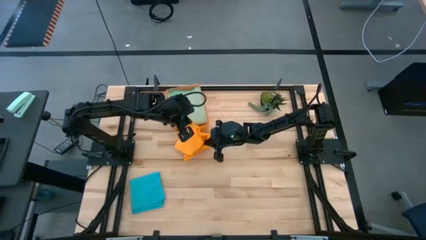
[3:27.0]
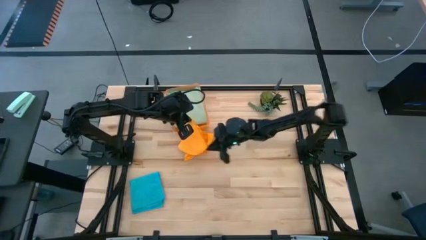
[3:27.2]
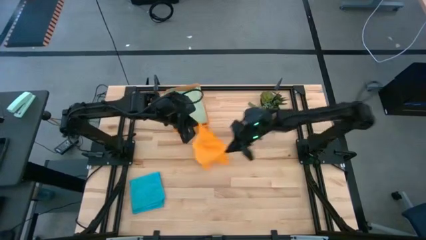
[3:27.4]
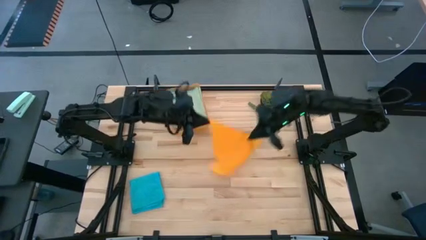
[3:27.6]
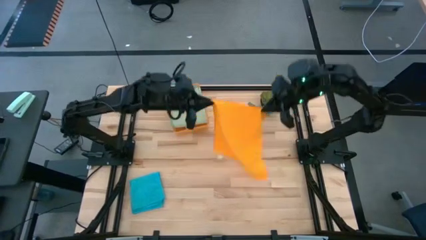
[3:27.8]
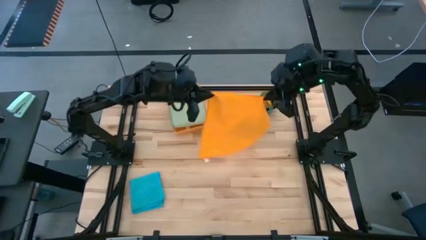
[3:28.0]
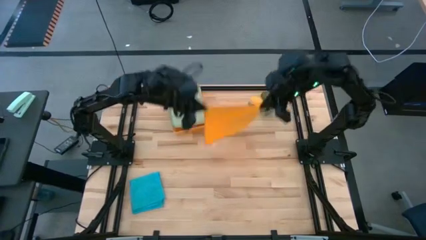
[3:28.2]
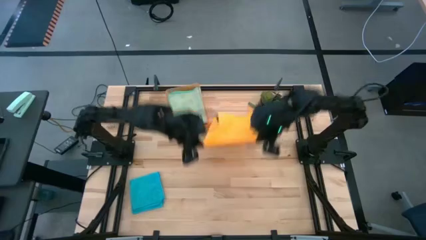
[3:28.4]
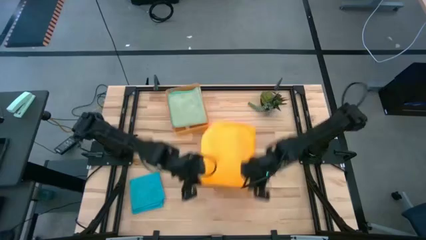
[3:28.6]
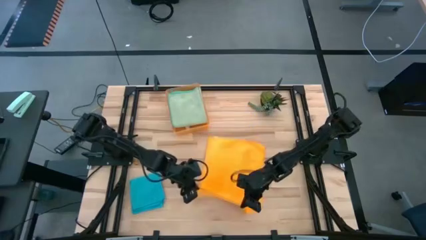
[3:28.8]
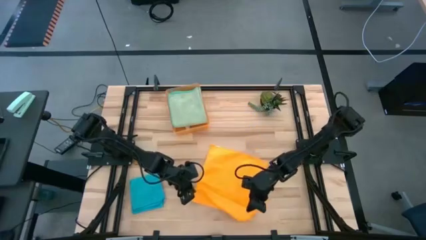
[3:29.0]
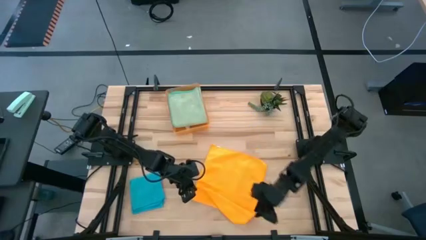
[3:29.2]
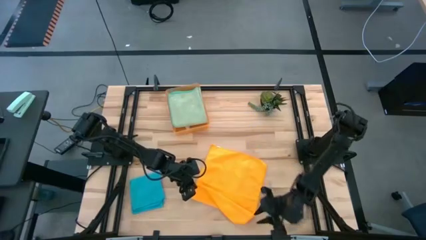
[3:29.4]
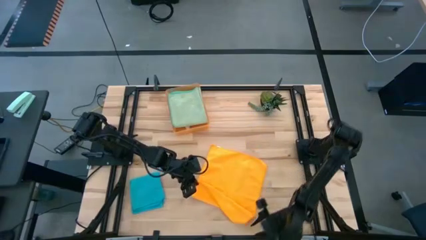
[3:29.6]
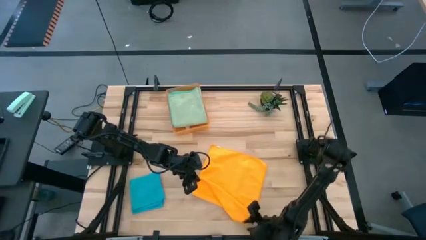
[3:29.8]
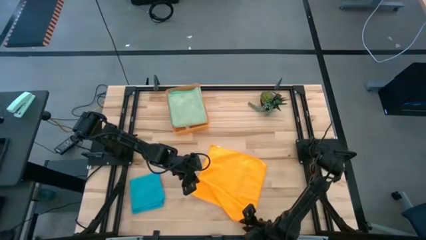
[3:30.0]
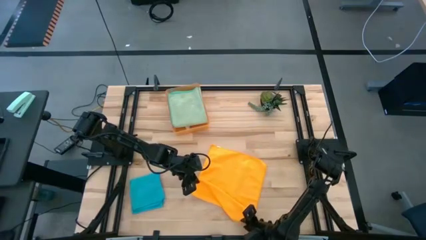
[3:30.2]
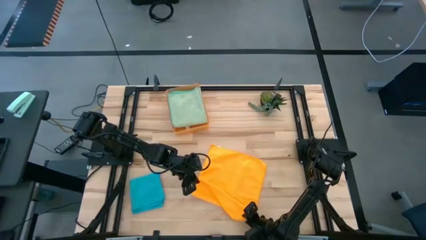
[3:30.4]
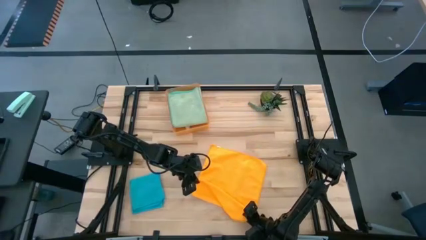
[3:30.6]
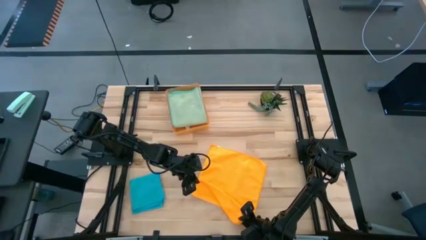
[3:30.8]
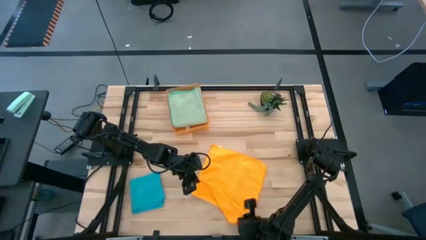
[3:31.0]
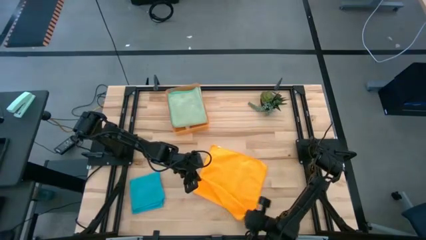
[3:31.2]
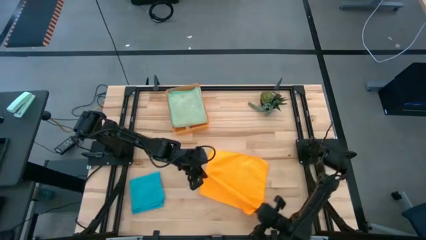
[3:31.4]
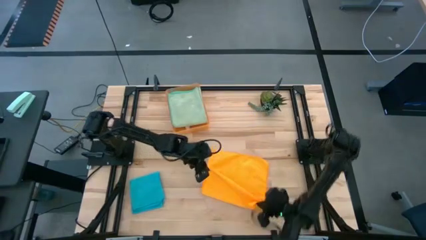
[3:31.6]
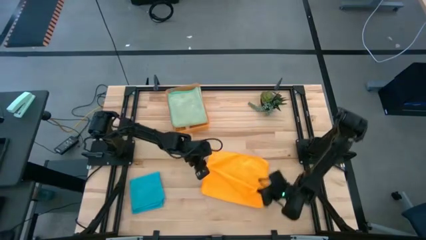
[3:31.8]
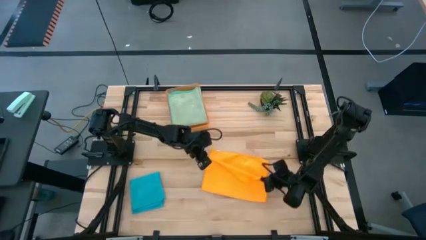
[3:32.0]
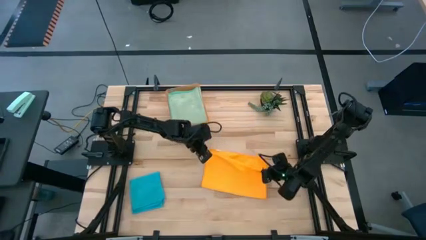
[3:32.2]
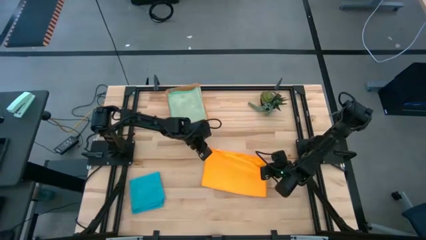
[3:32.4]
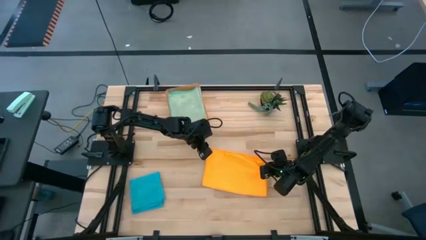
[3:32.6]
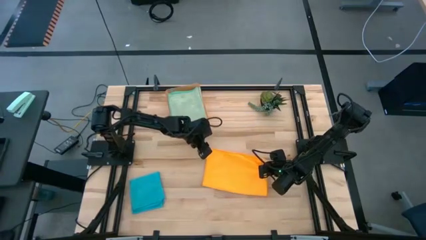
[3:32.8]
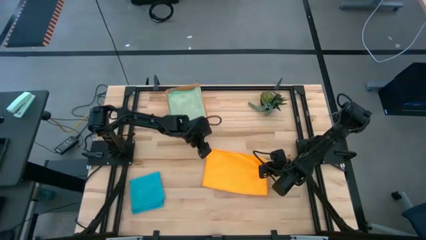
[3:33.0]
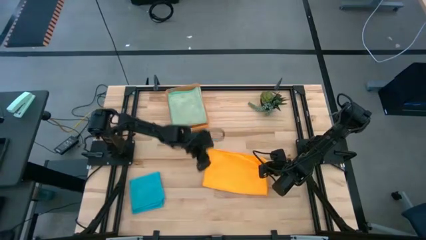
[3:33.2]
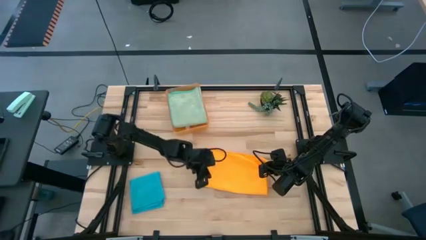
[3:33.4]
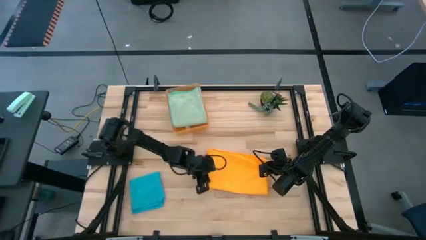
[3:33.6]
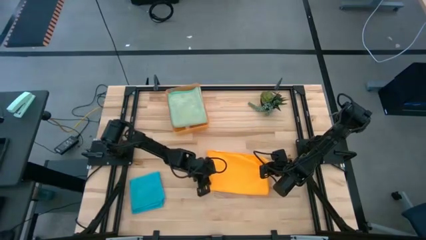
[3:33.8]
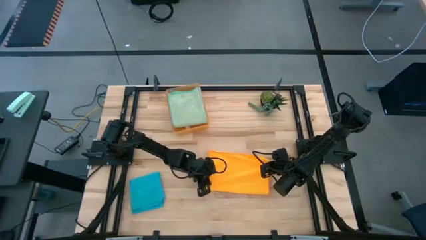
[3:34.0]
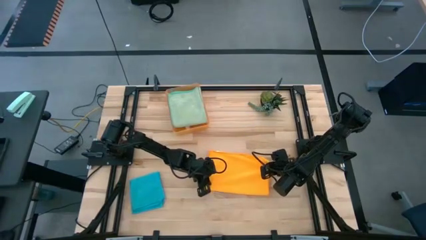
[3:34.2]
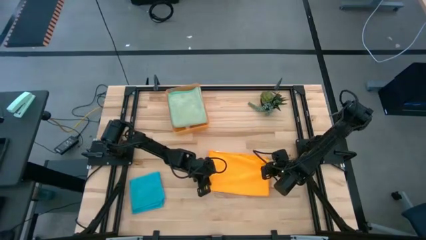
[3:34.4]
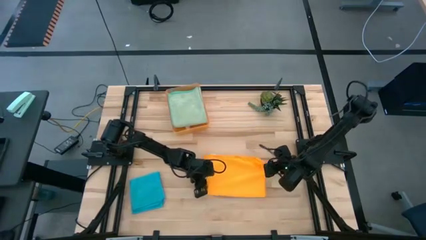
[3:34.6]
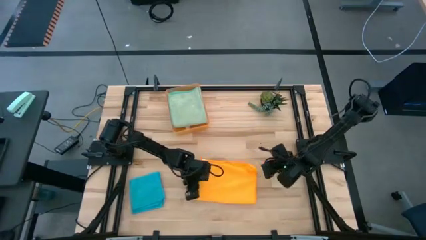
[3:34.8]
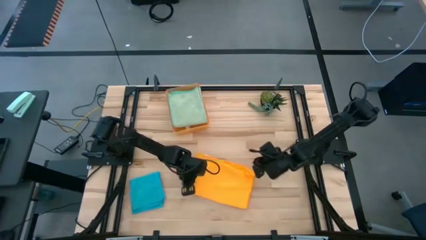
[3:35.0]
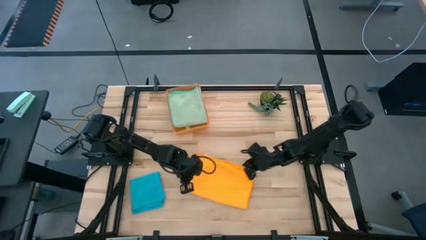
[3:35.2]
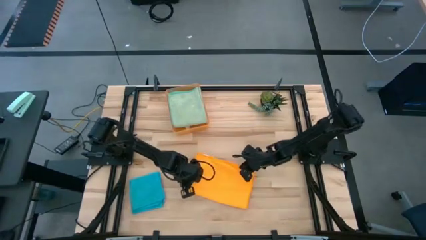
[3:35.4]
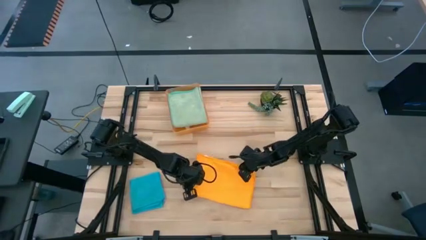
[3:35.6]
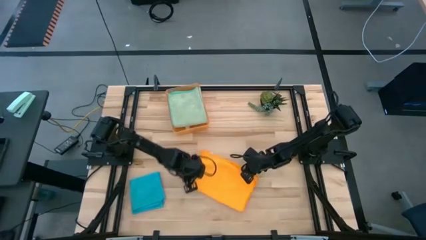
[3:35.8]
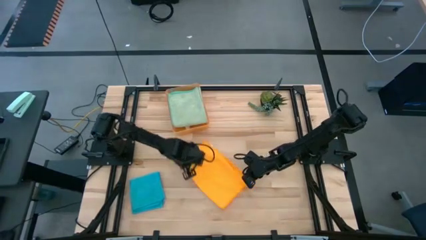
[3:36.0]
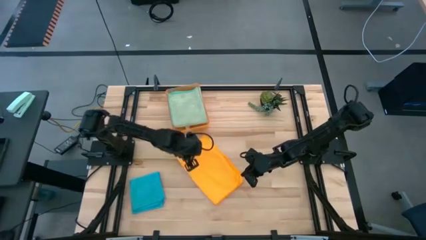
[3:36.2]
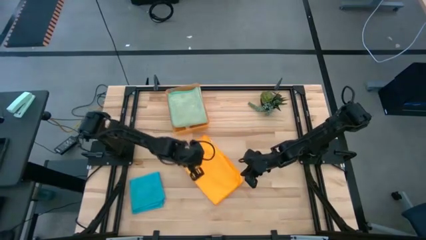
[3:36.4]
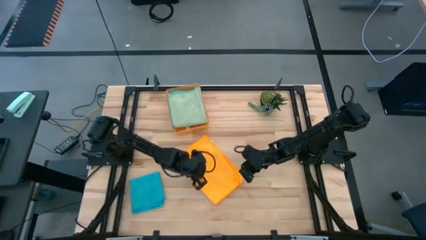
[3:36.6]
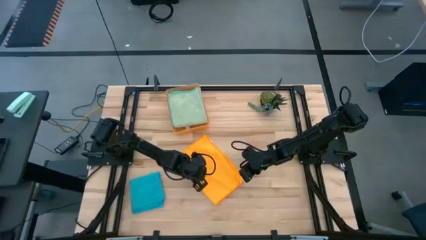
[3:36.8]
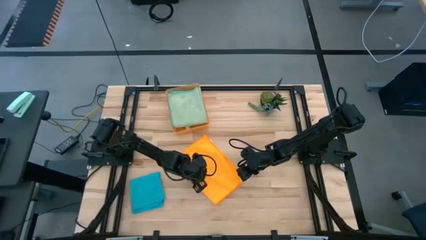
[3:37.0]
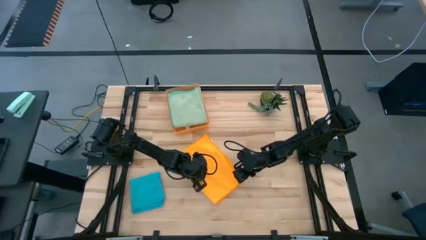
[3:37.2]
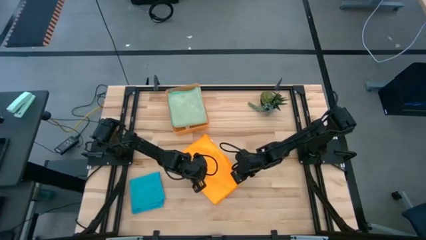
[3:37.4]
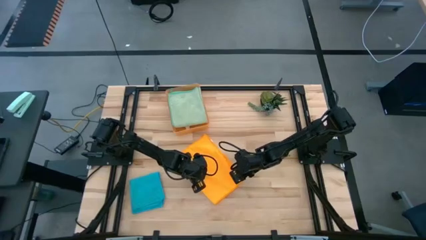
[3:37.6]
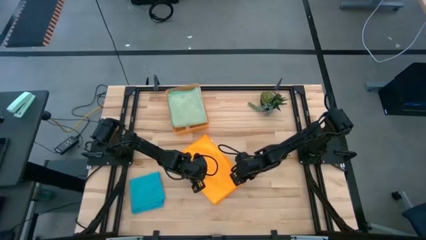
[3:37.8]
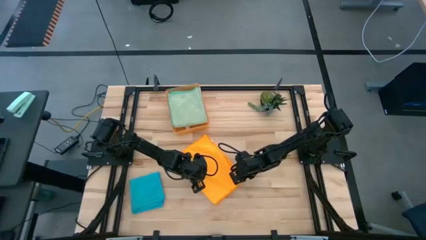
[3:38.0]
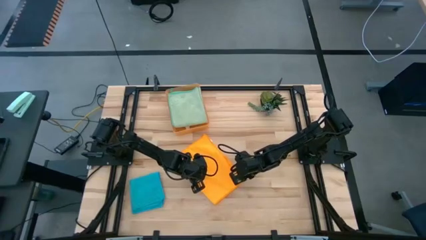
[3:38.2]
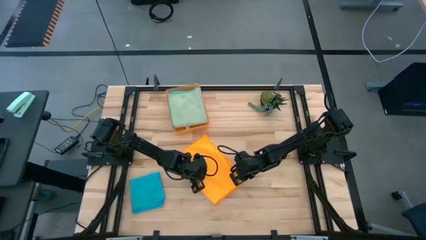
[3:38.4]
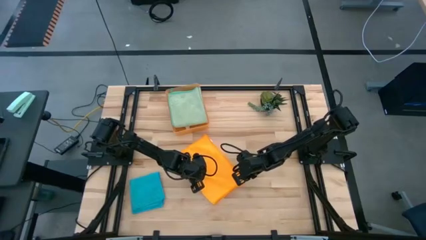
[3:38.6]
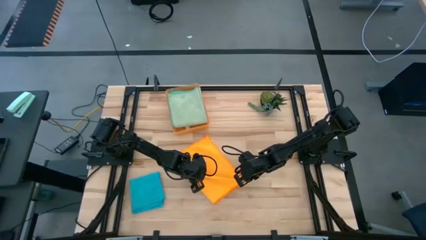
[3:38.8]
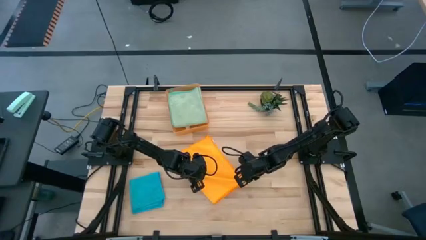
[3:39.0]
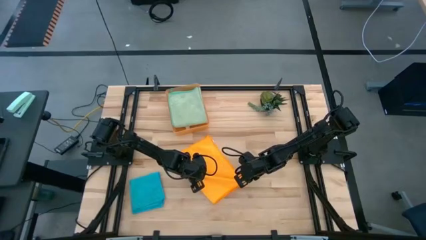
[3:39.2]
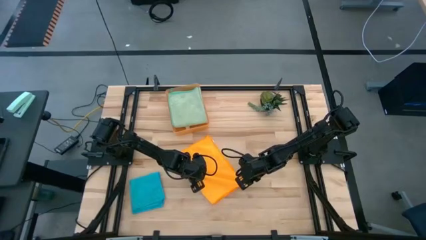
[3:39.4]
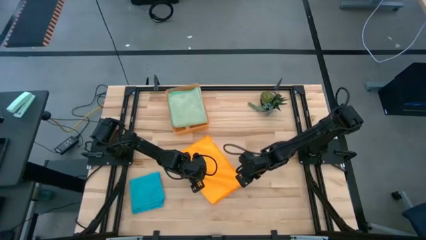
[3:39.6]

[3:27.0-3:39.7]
Task: Fold microfiber towels
Fold the orange microfiber cloth
